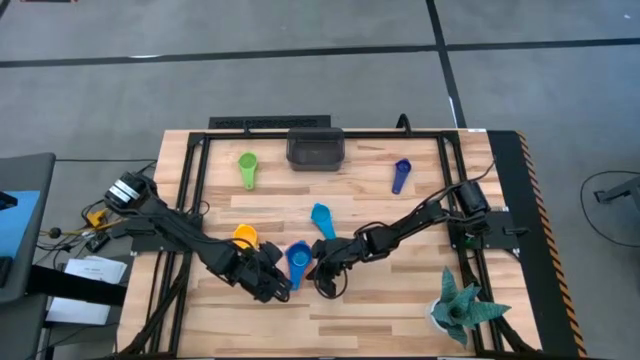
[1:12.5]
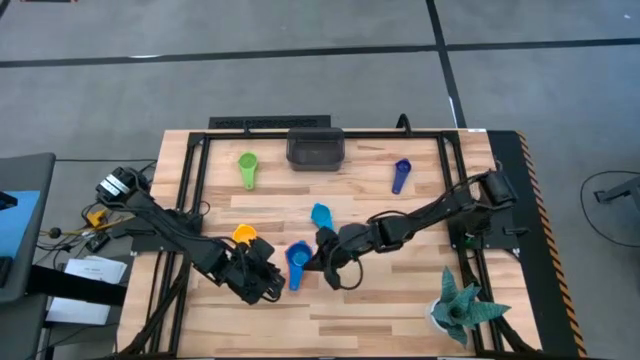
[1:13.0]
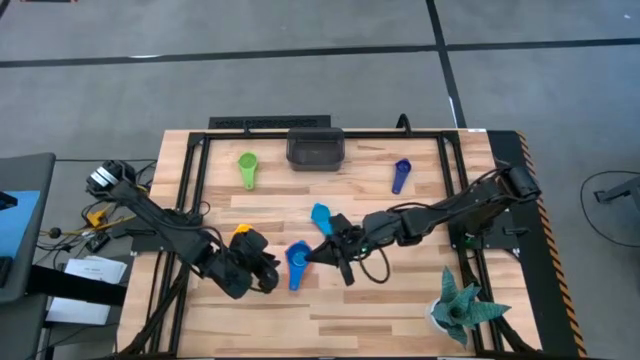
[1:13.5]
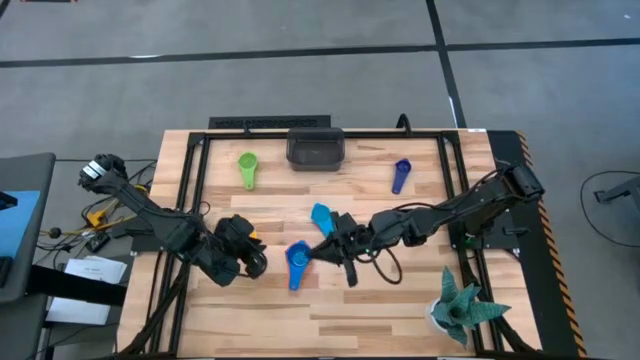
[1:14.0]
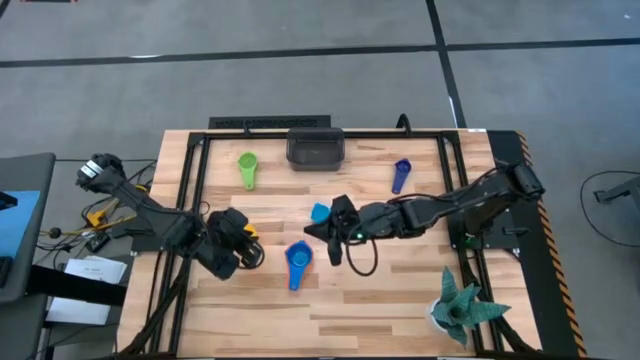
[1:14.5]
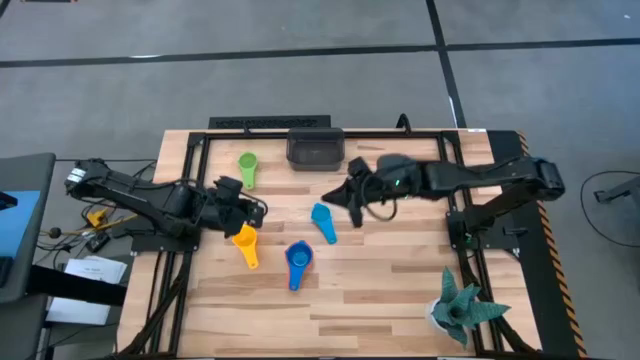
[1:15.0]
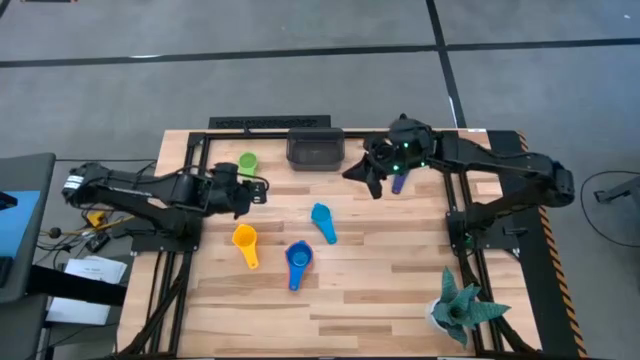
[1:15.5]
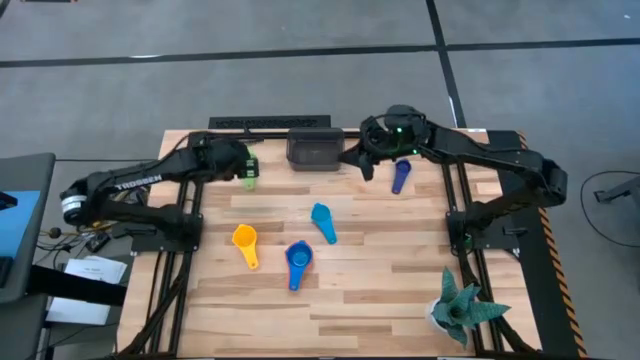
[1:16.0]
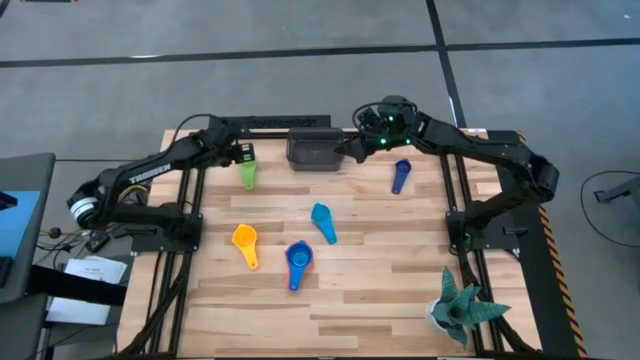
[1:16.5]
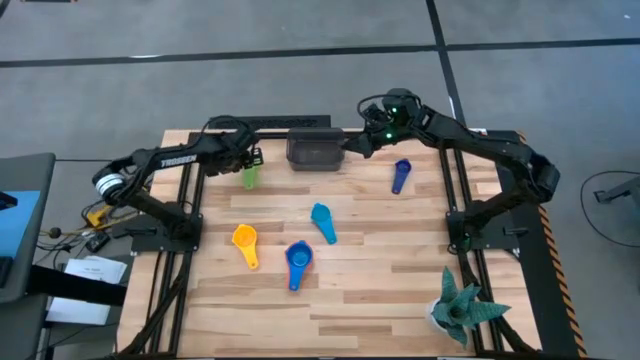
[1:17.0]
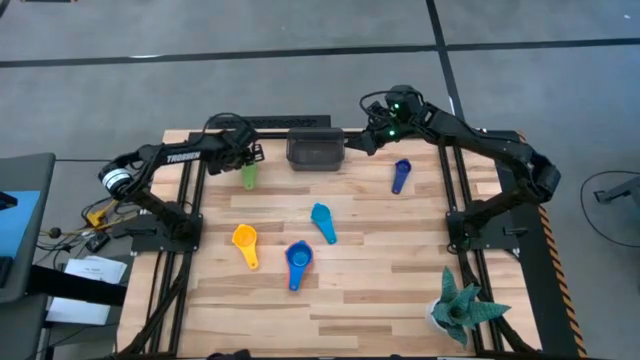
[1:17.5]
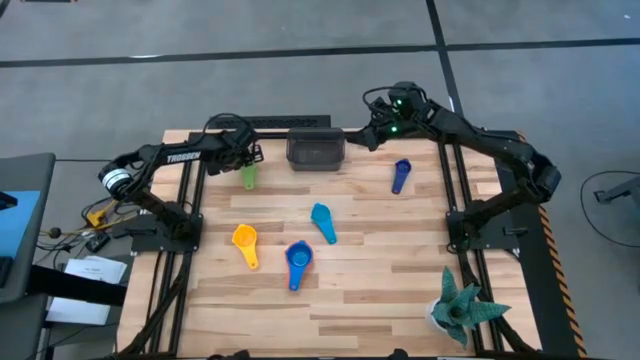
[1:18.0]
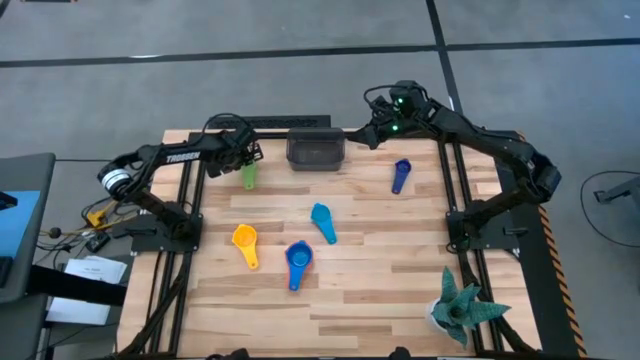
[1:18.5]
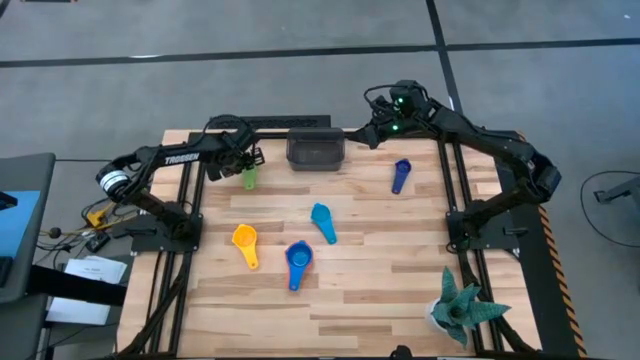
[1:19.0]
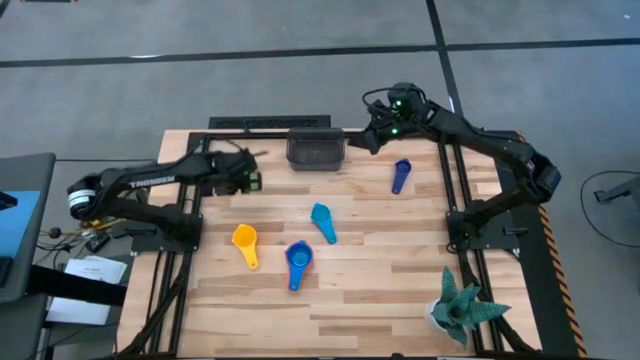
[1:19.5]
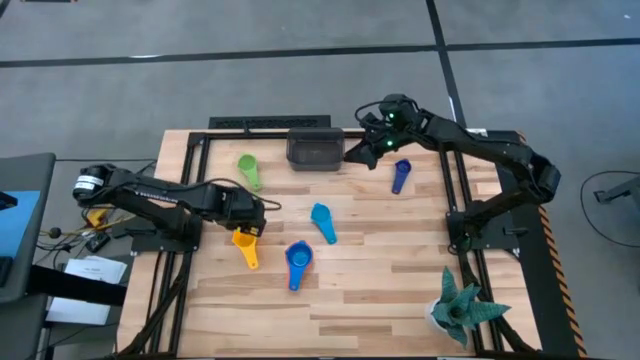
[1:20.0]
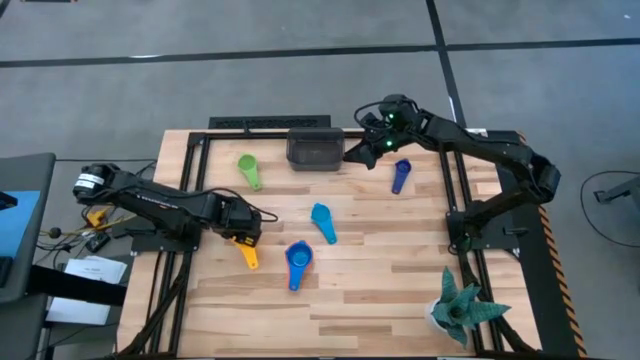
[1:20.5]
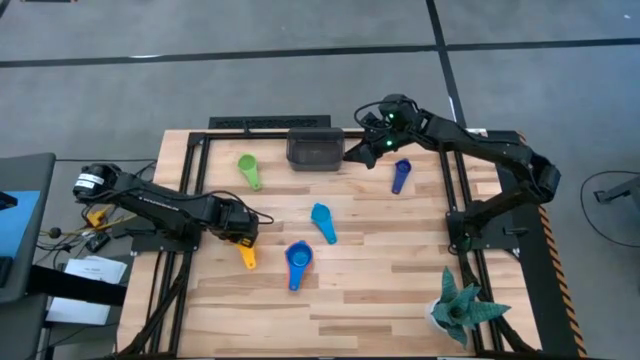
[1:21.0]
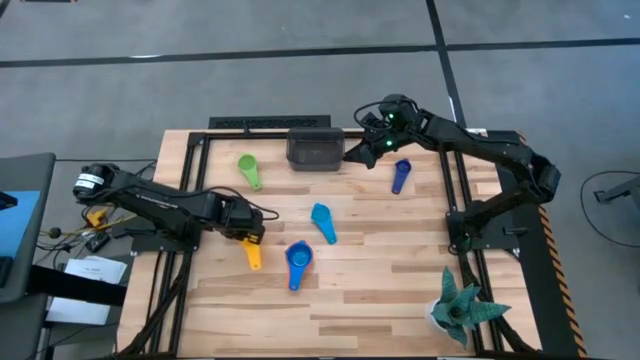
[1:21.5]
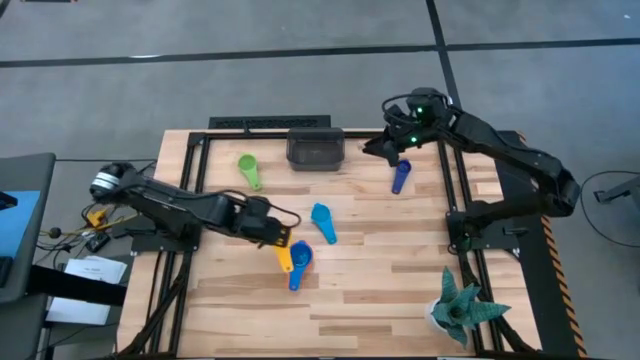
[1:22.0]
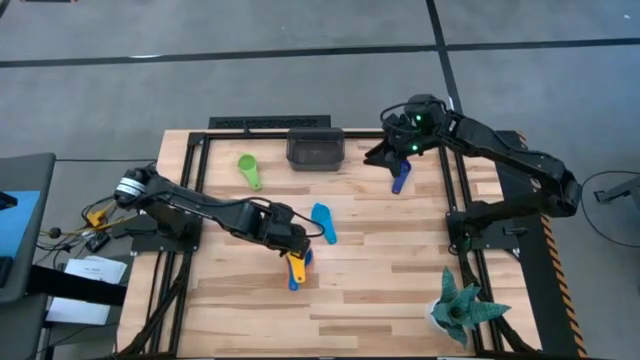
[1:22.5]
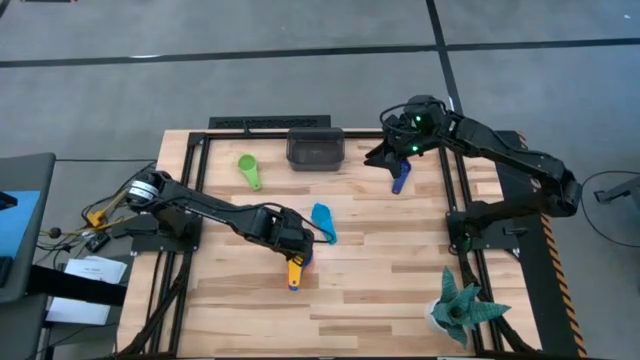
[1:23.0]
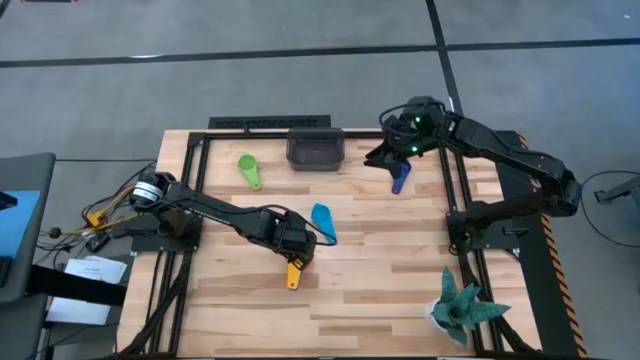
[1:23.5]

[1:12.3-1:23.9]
Task: Nest measuring cups in basket
Stack the yellow measuring cup on top of the blue measuring cup

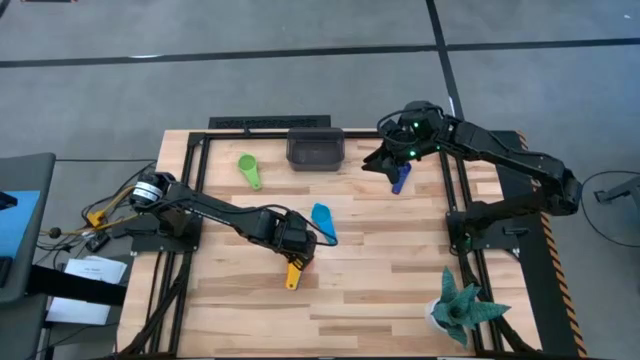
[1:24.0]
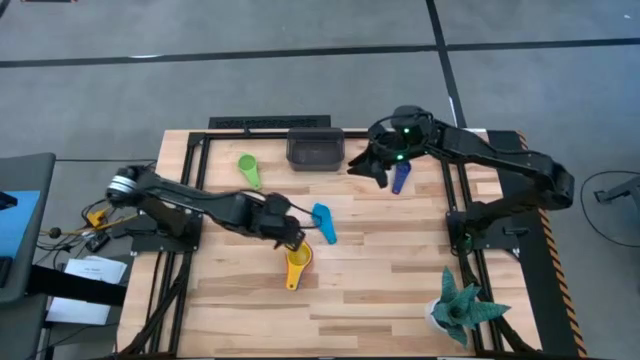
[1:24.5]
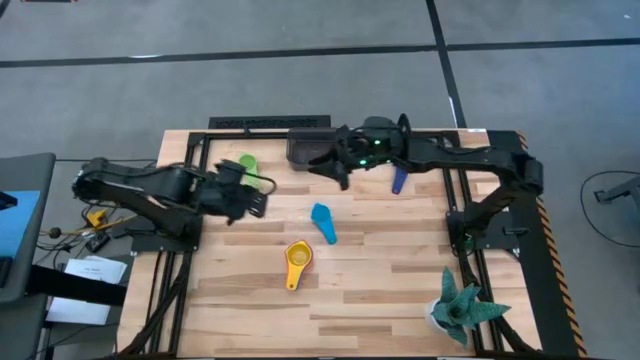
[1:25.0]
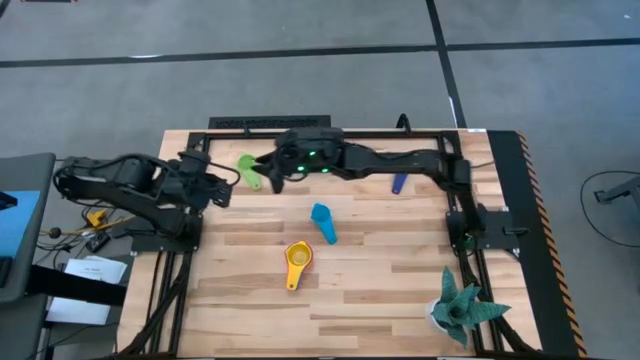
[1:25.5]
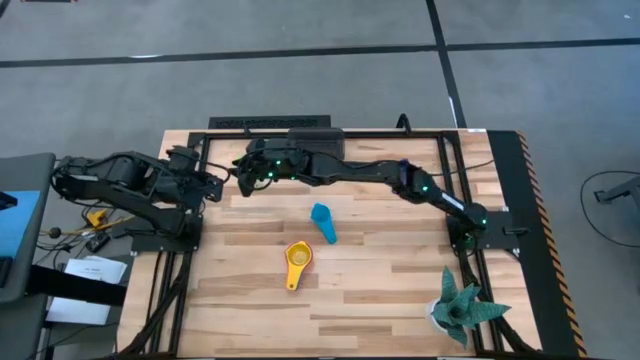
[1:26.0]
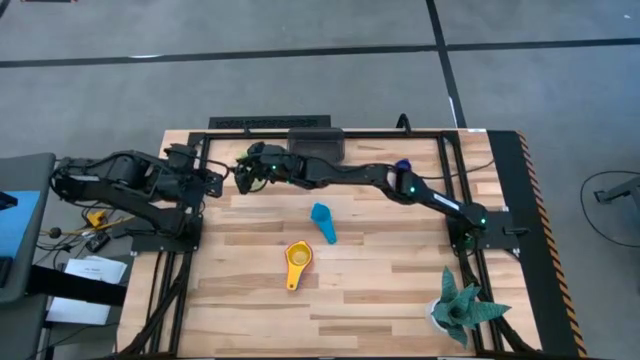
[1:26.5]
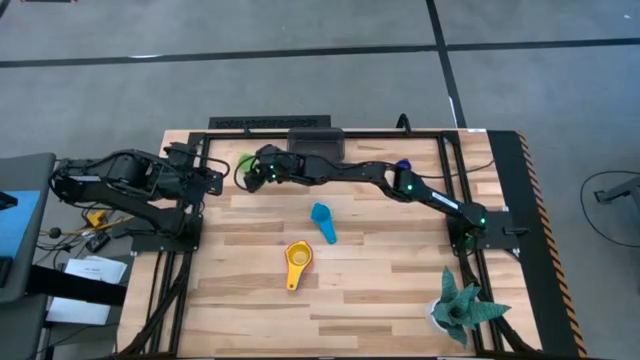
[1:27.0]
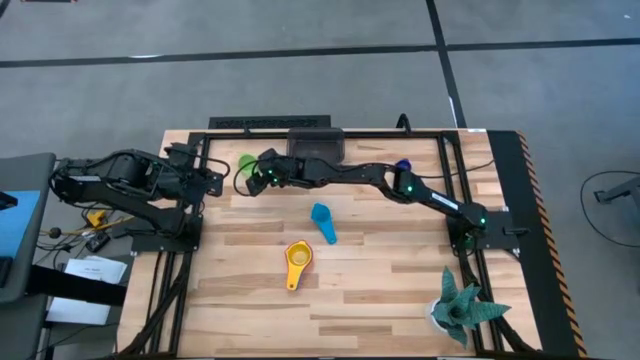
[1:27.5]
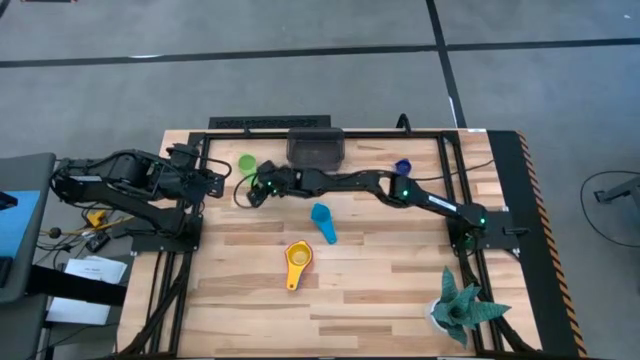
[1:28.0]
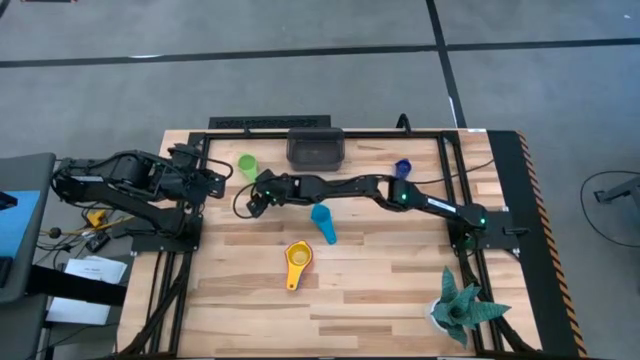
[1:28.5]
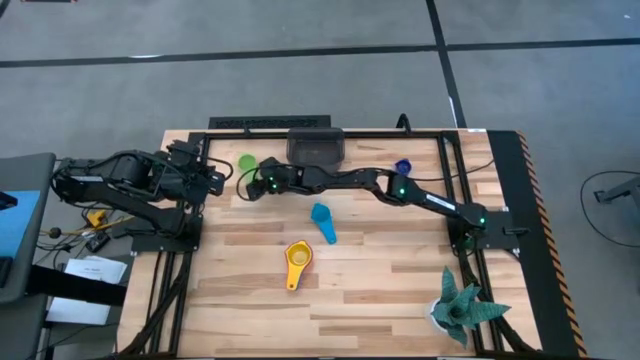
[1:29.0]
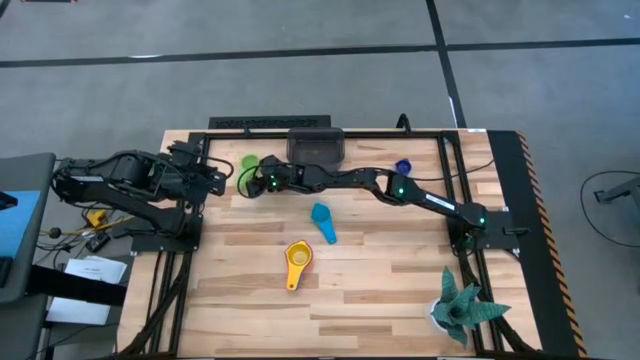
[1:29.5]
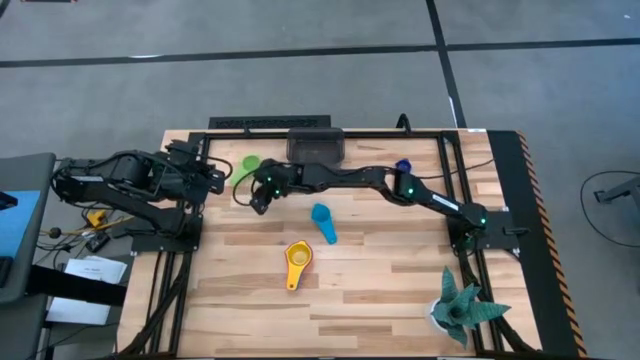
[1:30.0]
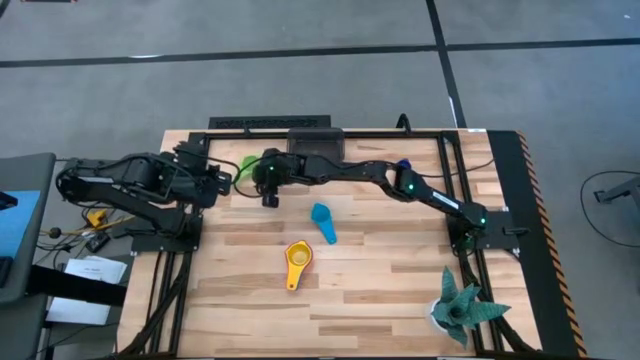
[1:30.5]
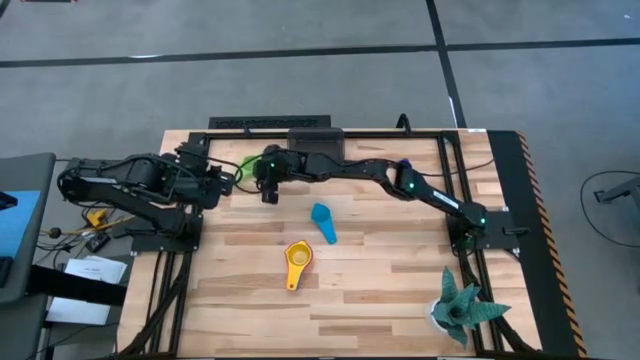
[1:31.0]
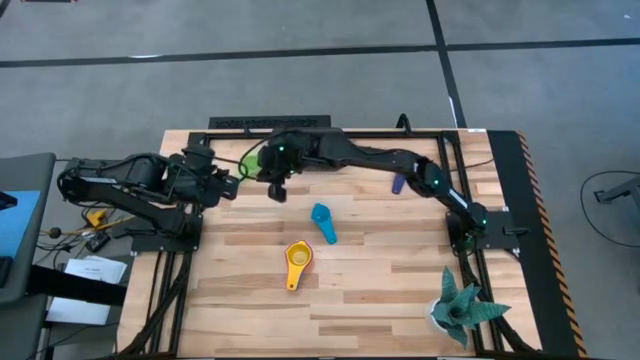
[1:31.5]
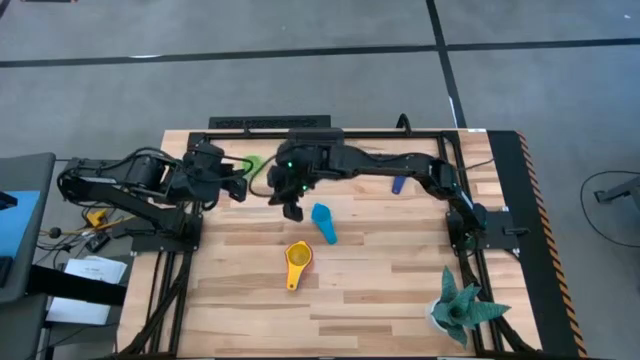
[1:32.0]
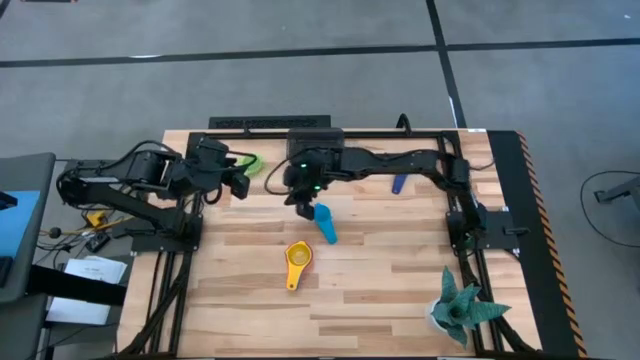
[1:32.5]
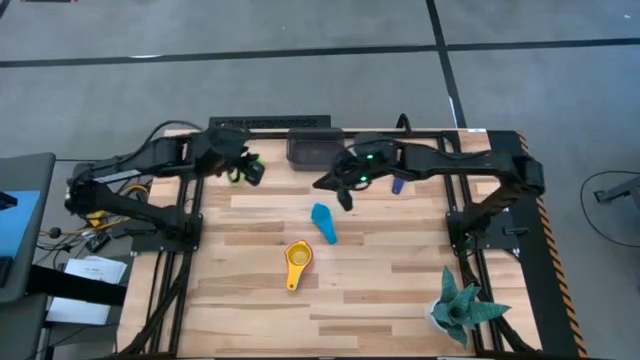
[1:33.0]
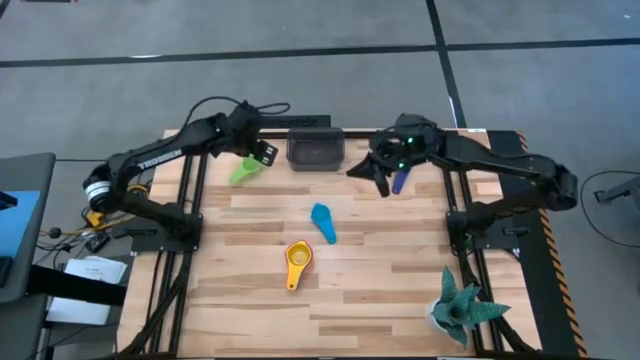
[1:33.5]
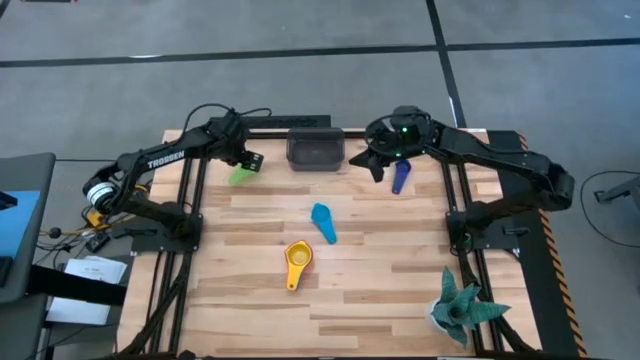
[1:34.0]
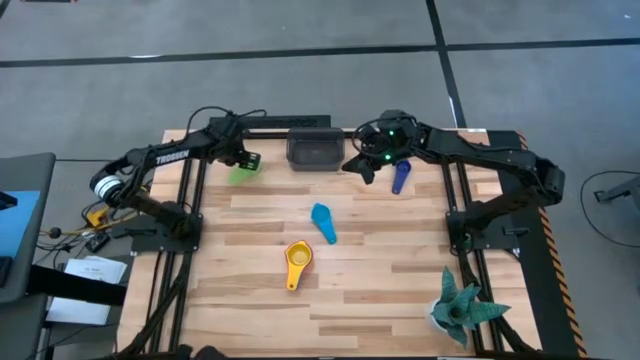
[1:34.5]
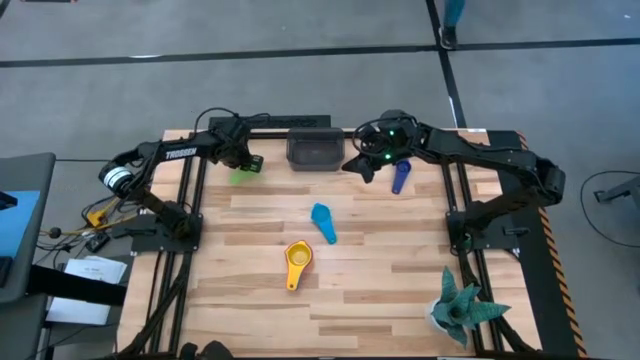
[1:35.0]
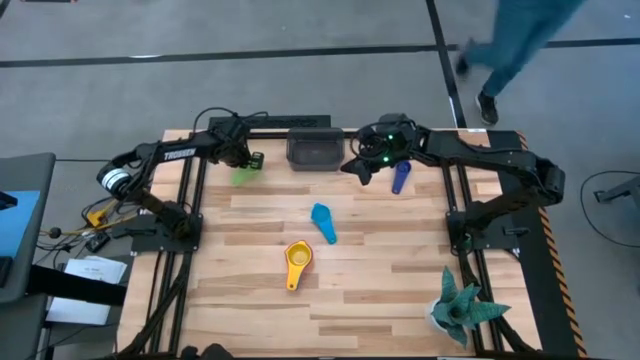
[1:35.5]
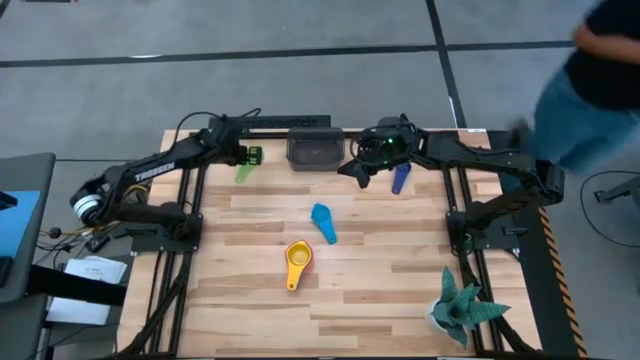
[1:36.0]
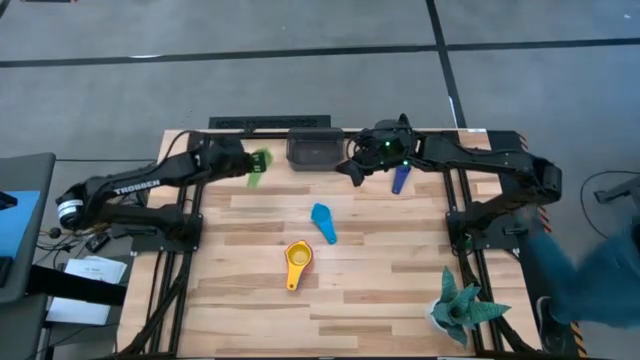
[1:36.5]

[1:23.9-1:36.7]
Stack the green measuring cup on top of the yellow measuring cup
